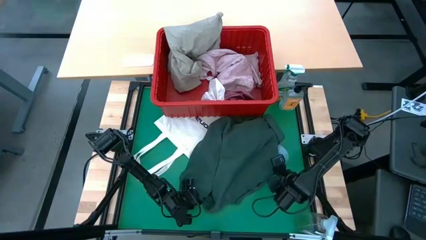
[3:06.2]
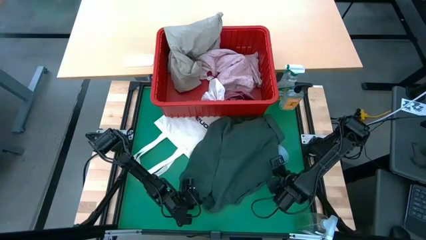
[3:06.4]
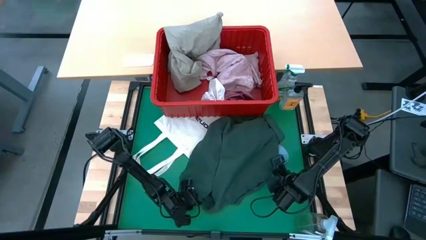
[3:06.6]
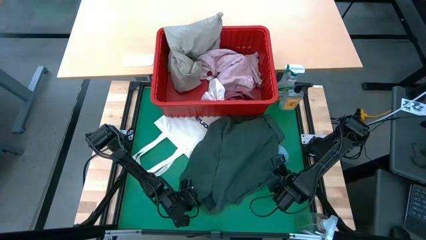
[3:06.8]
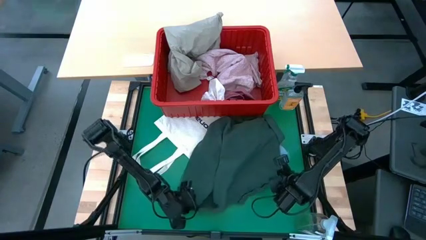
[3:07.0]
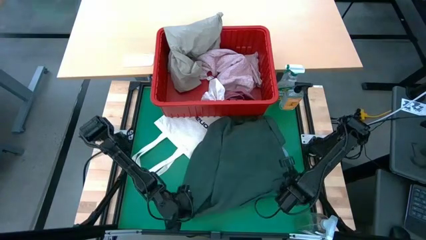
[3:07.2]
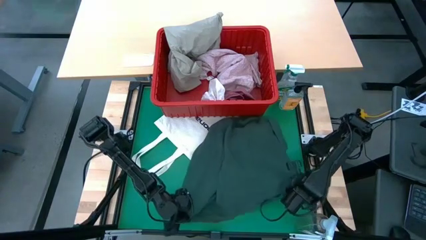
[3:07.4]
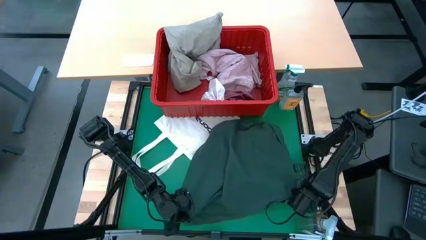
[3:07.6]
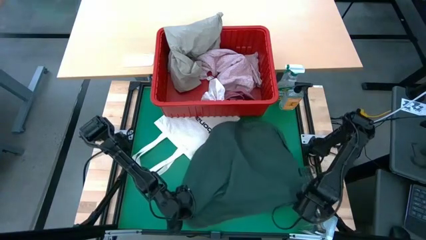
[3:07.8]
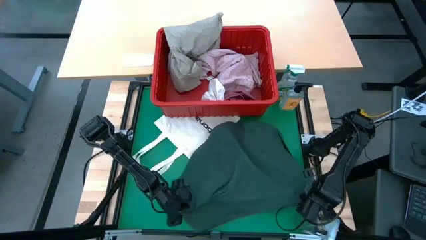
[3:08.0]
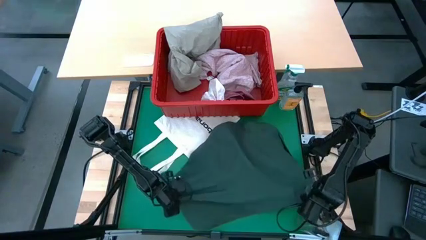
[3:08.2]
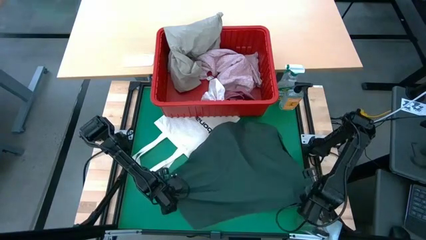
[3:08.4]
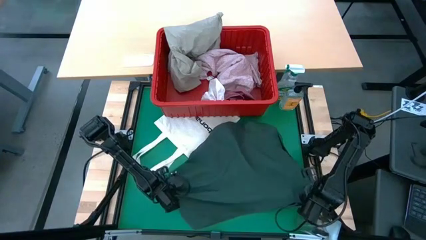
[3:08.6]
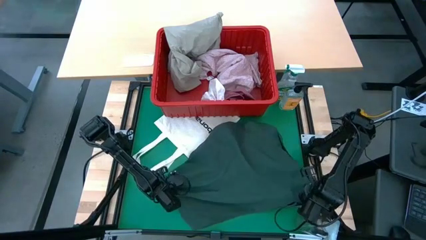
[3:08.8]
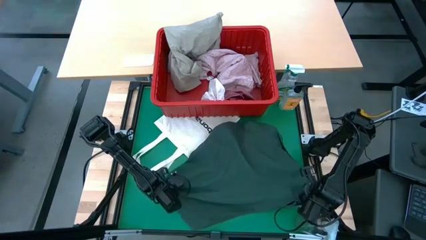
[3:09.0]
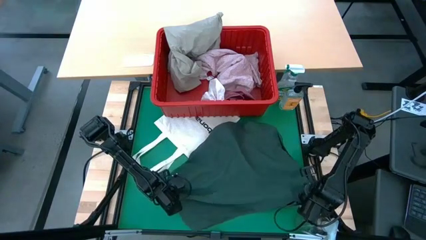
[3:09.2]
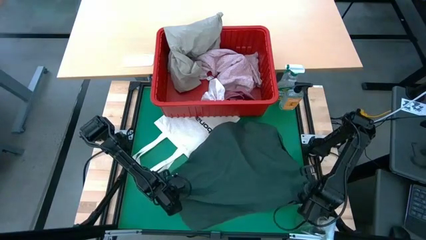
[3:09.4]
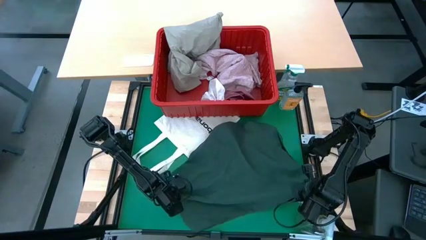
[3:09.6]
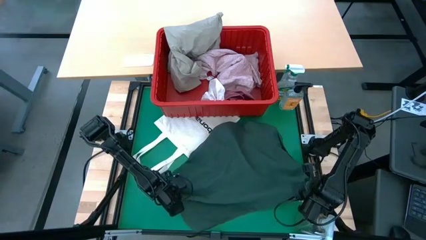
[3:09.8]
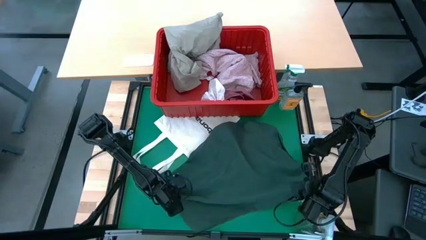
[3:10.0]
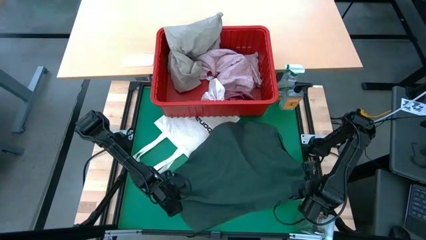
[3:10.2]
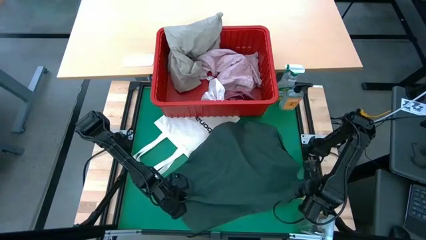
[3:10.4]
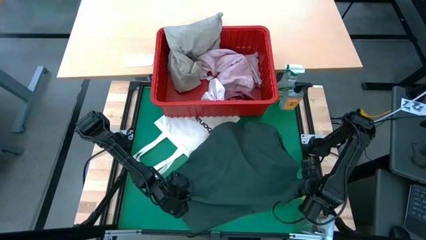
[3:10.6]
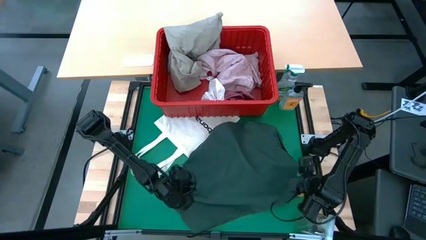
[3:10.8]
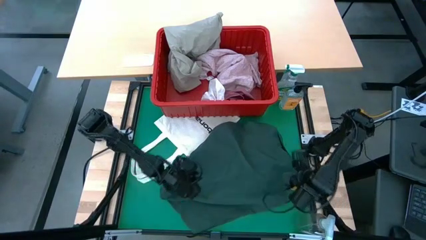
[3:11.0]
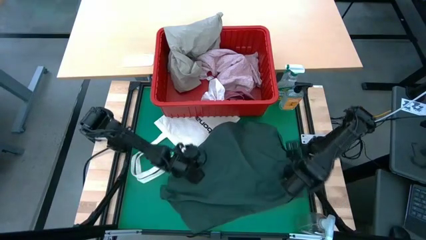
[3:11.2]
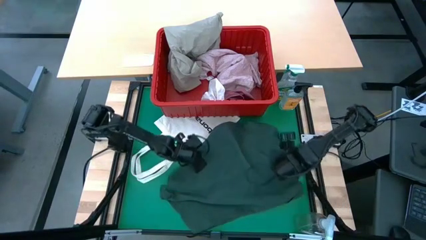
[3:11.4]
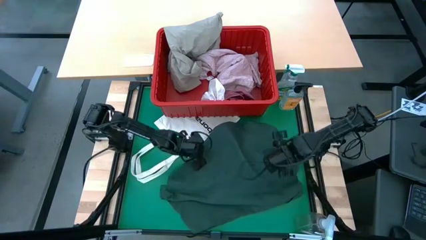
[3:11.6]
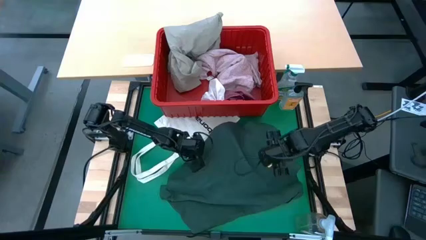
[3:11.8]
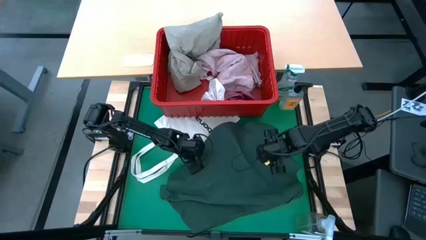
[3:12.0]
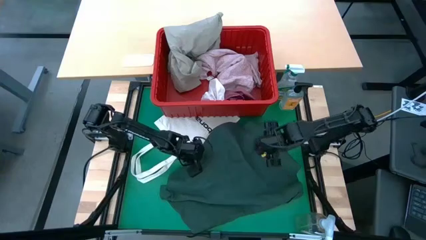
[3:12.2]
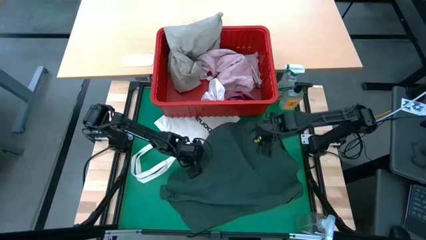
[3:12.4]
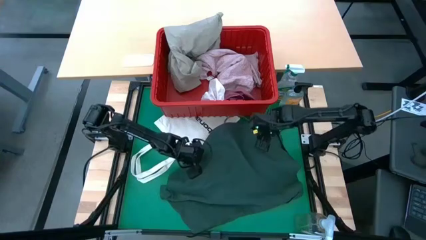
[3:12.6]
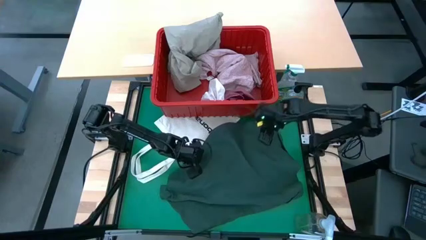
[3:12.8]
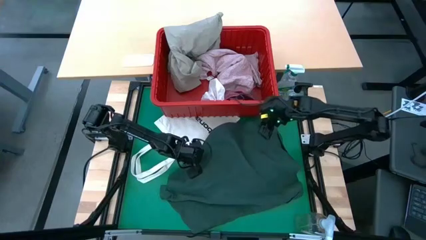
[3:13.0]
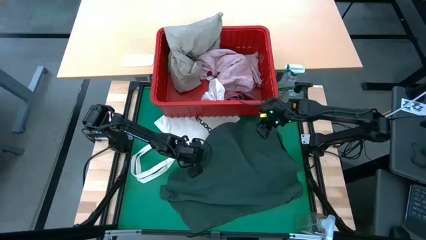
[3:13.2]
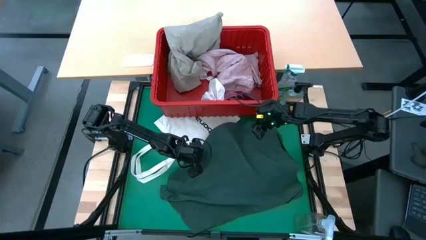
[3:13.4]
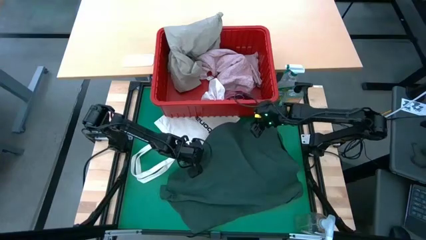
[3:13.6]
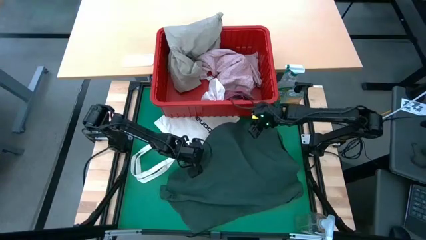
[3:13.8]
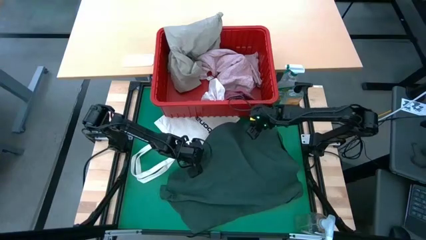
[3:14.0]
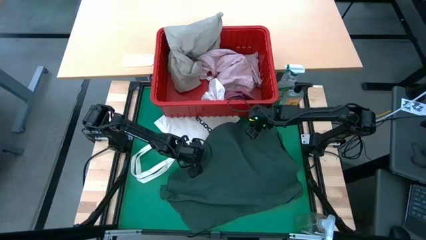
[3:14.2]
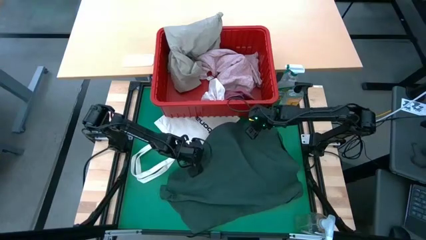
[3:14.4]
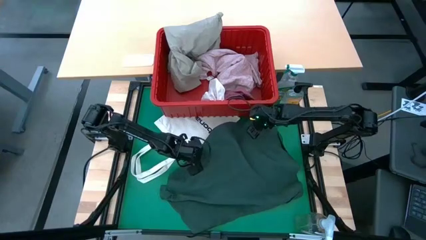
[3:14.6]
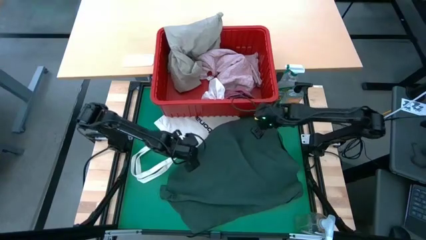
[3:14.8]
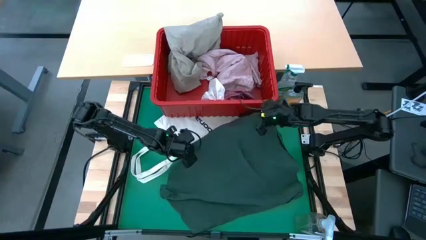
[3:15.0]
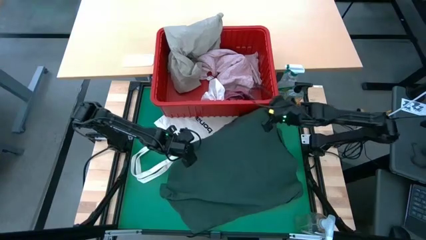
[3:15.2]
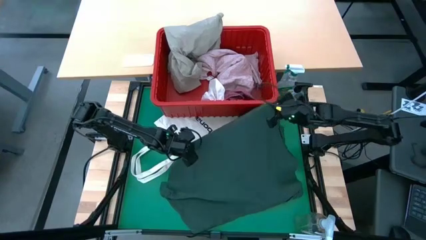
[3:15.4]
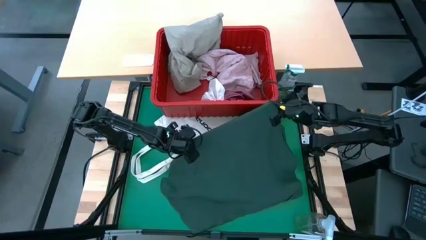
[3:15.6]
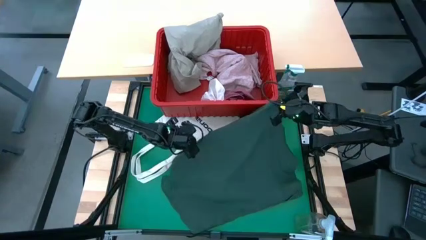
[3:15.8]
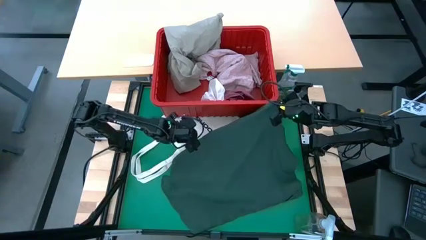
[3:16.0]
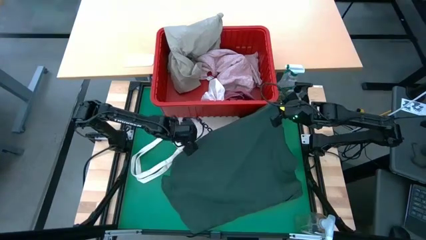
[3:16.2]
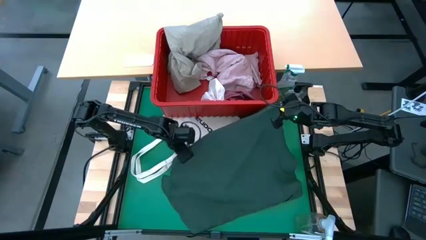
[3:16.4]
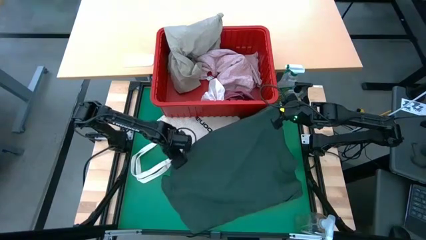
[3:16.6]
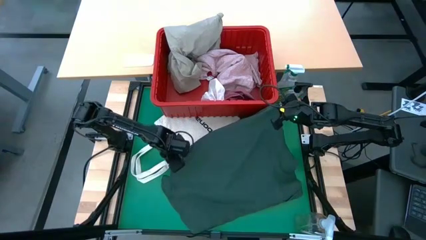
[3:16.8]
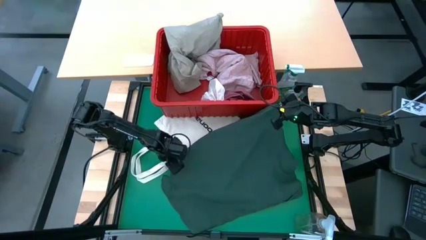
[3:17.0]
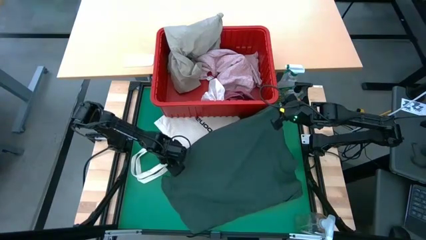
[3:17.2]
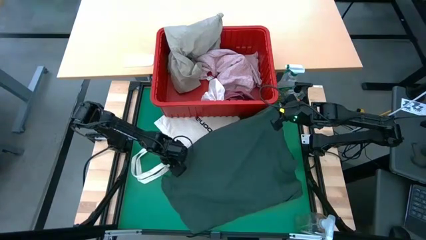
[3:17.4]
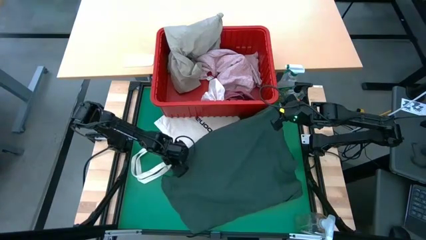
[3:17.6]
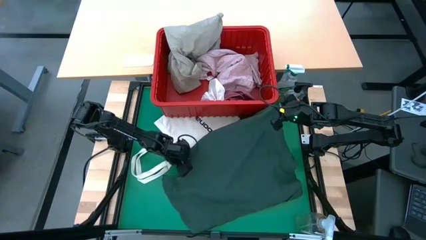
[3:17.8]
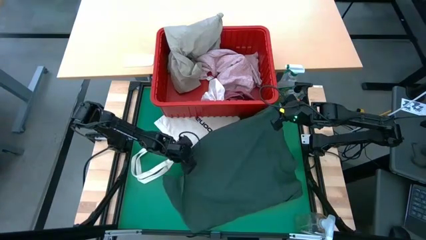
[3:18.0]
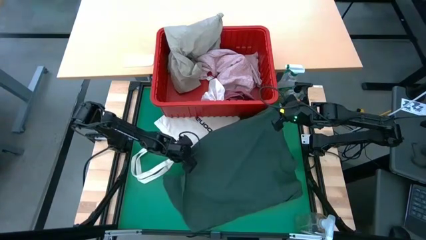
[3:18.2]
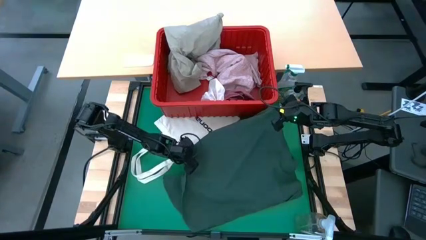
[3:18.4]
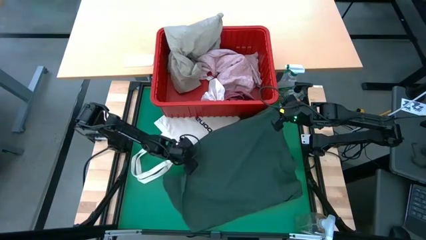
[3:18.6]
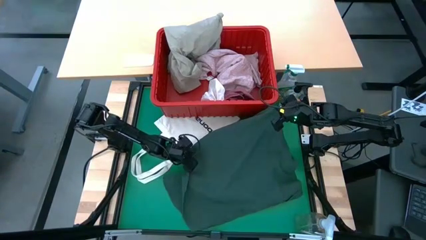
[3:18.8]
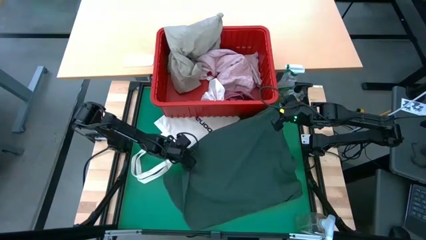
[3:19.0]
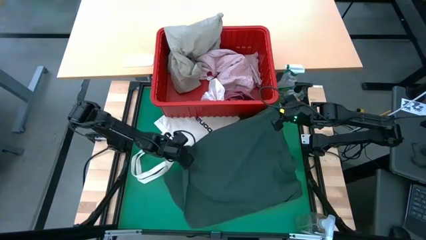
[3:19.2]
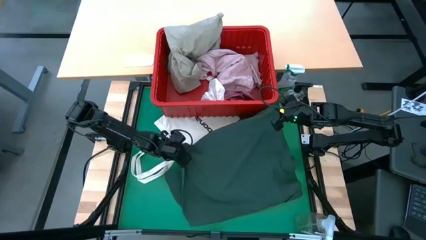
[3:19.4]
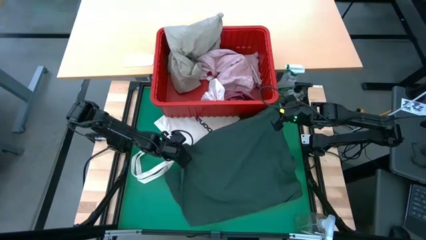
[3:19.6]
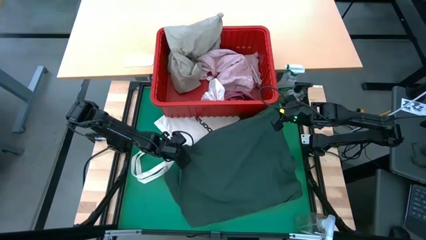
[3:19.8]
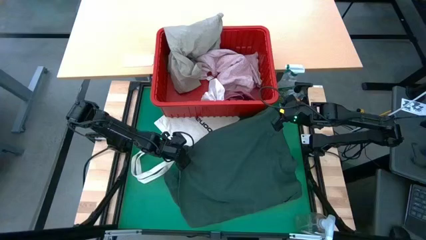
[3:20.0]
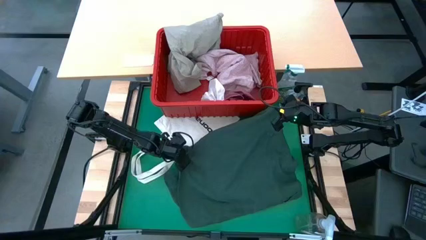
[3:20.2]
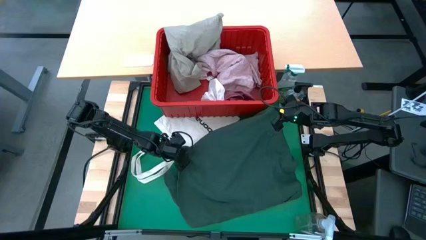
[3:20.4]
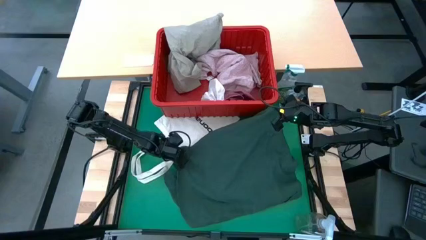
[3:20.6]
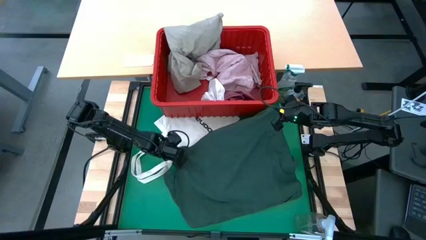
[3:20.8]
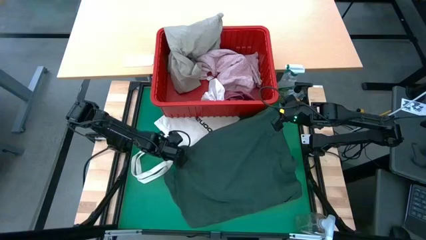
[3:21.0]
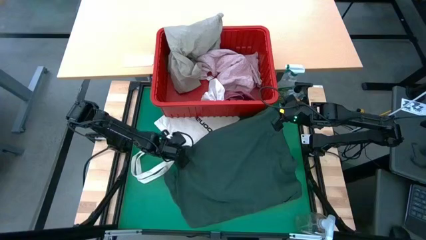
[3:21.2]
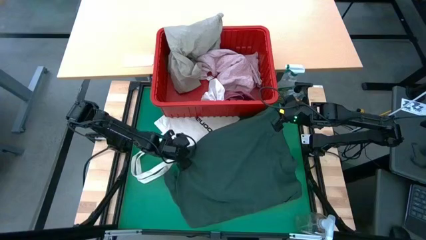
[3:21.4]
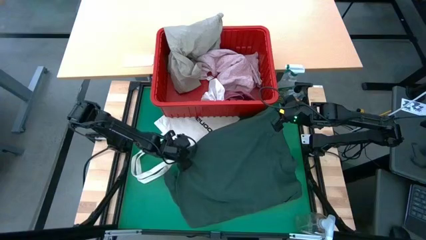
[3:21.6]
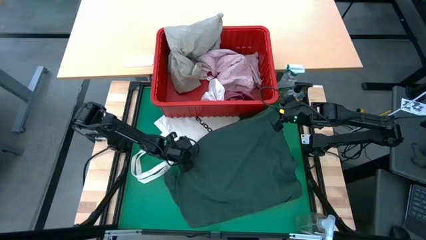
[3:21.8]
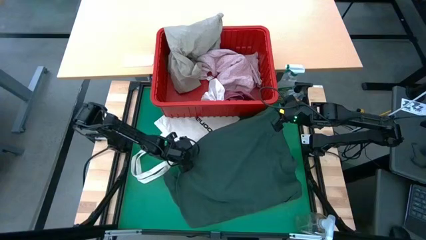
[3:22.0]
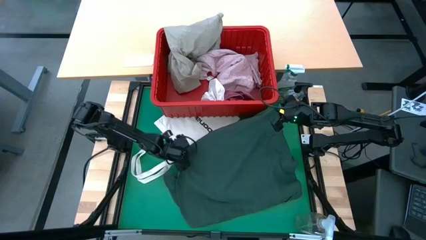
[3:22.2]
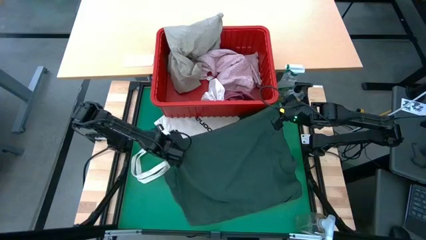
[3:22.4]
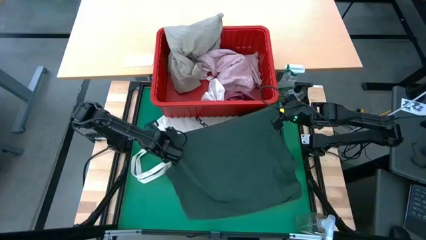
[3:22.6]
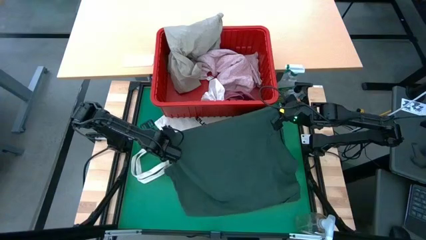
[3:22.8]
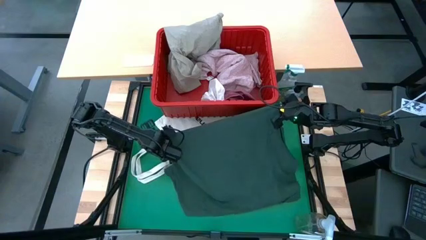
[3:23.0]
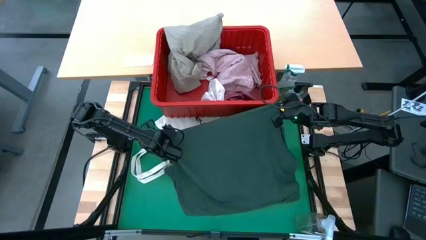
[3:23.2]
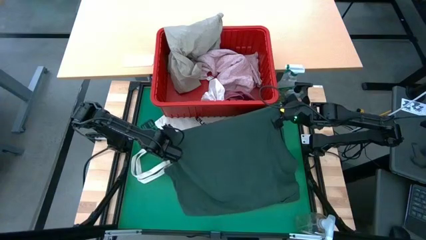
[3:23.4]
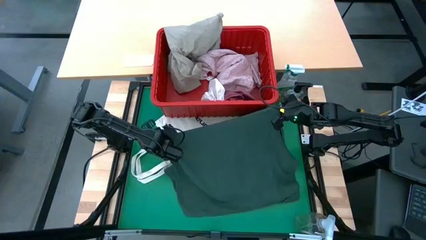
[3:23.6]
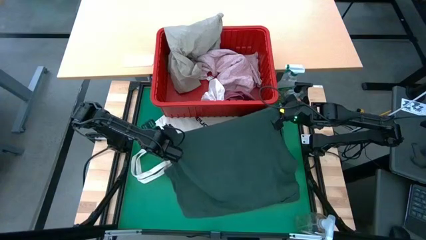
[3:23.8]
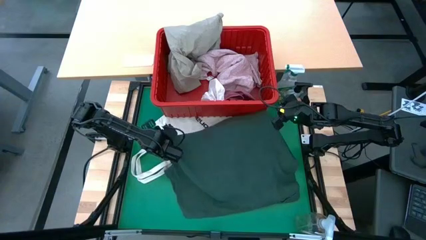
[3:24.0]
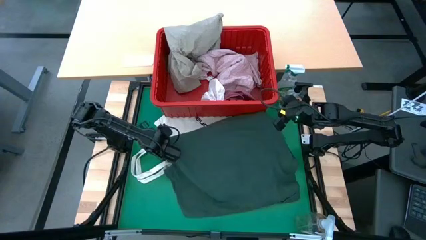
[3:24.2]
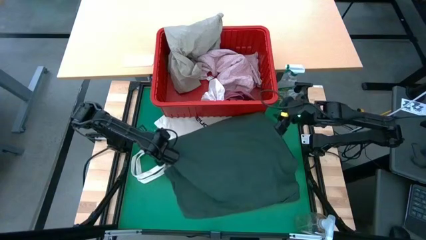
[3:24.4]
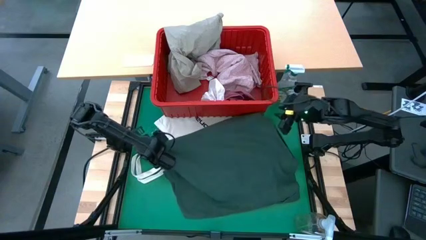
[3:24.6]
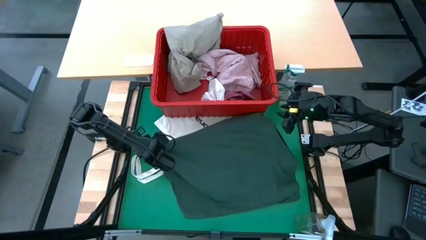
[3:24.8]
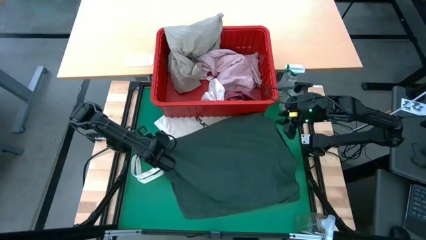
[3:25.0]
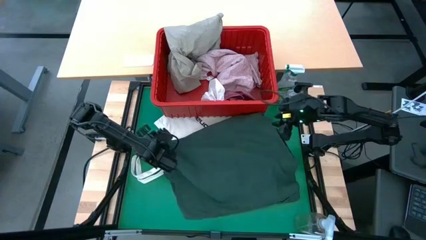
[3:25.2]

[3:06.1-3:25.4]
Task: Fold laundry
Fold the green shirt
